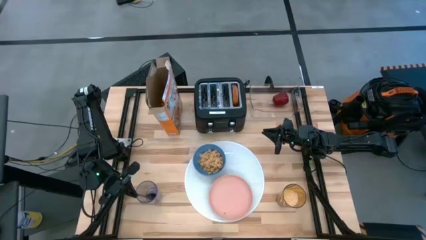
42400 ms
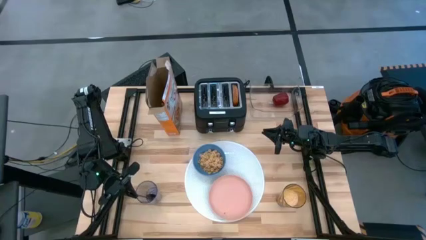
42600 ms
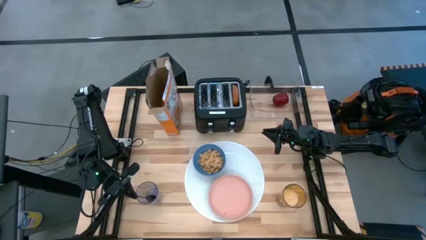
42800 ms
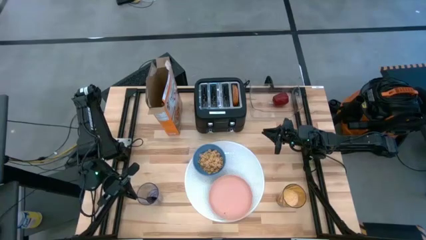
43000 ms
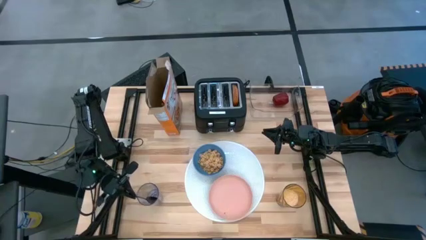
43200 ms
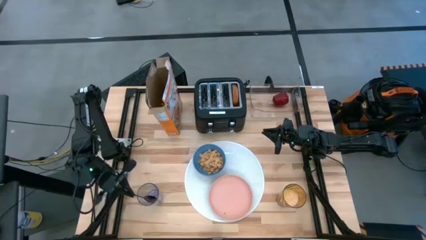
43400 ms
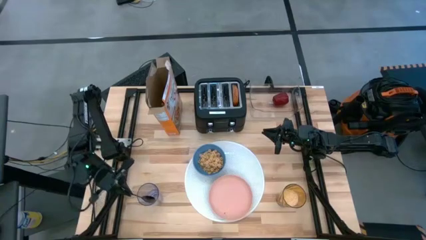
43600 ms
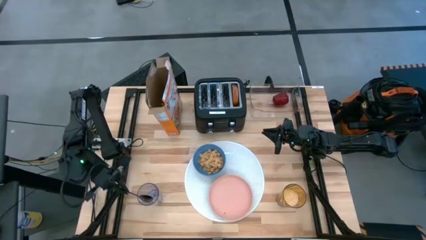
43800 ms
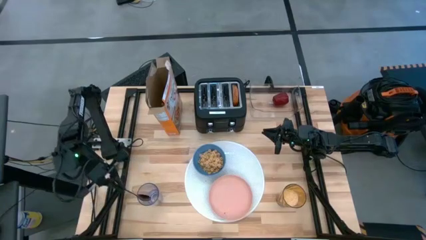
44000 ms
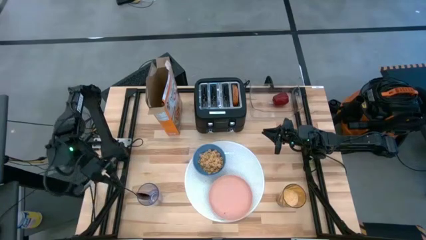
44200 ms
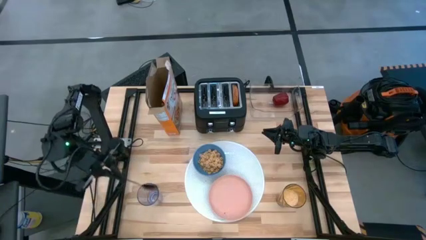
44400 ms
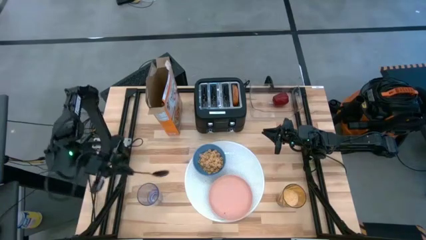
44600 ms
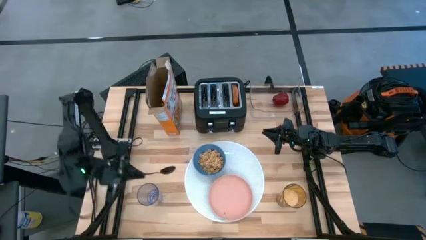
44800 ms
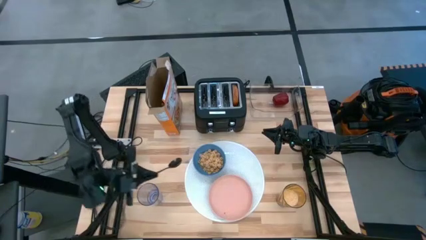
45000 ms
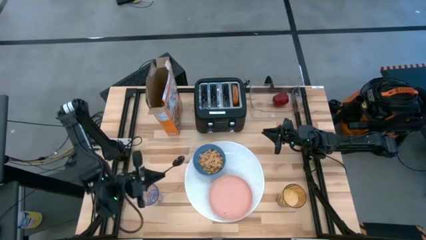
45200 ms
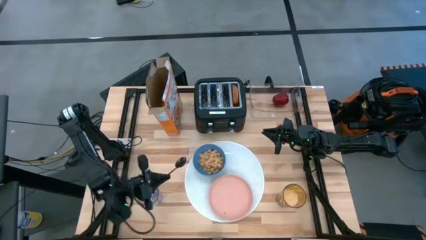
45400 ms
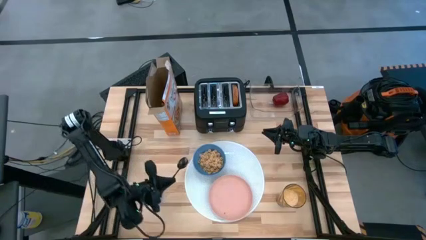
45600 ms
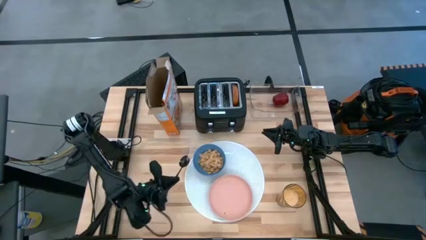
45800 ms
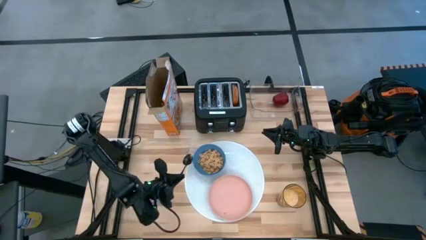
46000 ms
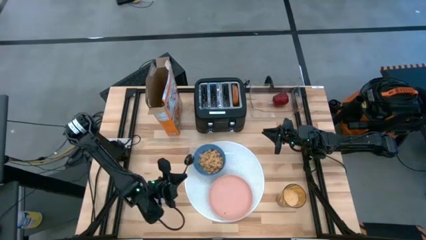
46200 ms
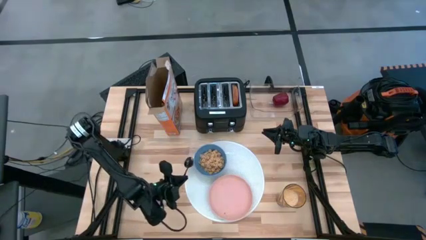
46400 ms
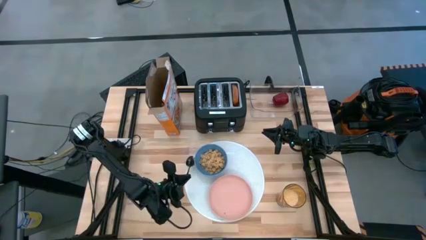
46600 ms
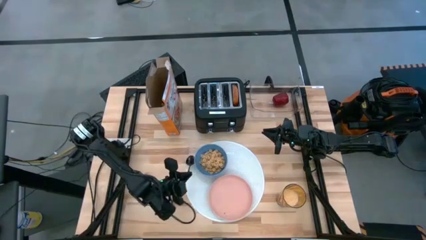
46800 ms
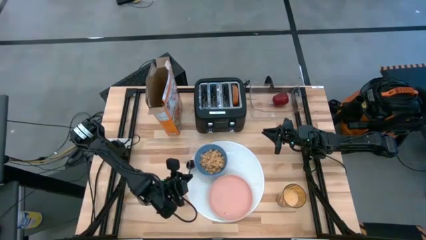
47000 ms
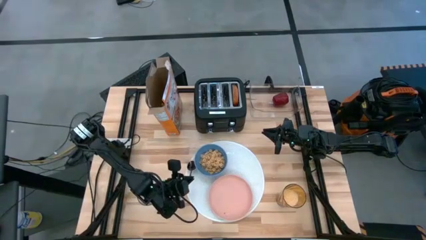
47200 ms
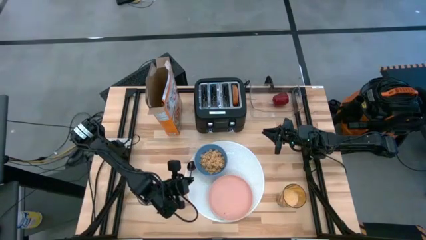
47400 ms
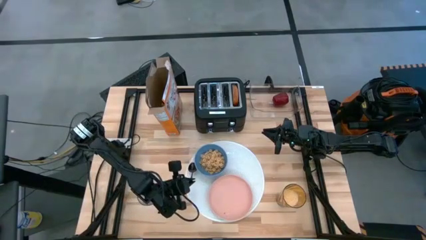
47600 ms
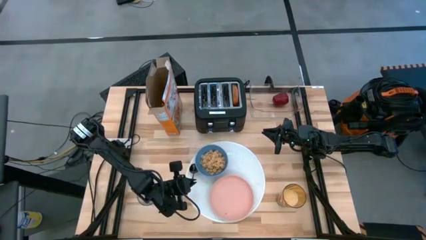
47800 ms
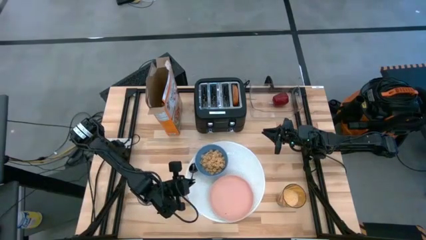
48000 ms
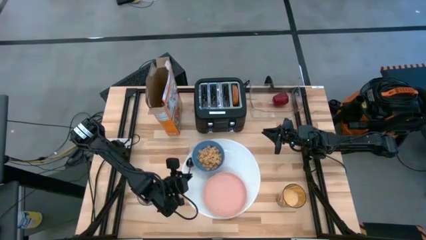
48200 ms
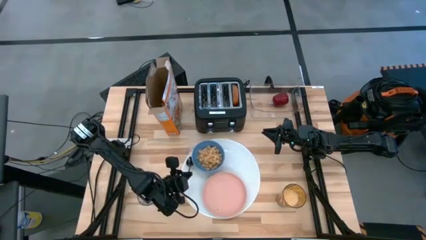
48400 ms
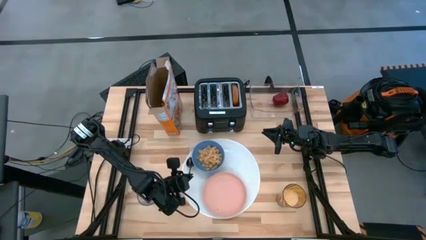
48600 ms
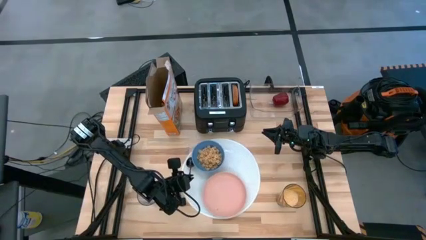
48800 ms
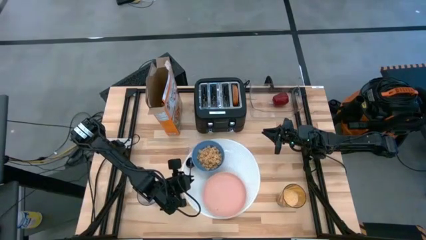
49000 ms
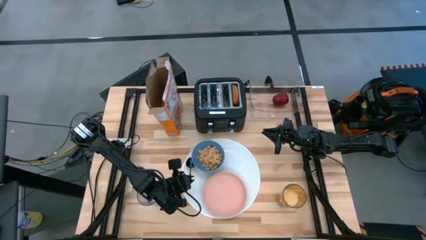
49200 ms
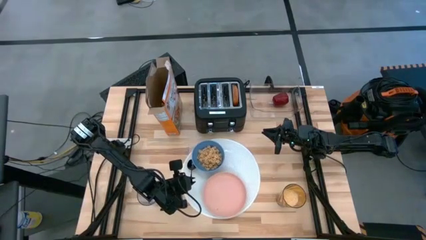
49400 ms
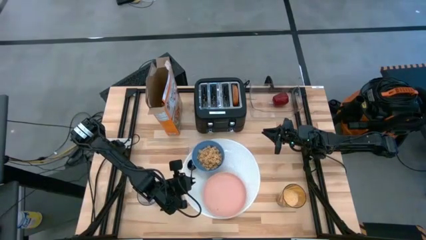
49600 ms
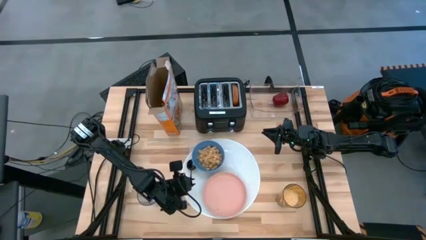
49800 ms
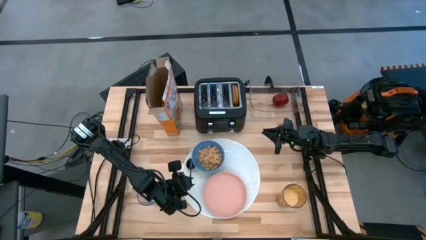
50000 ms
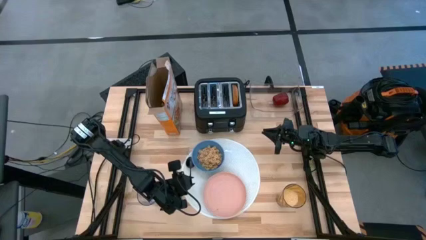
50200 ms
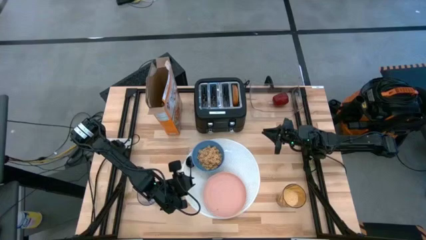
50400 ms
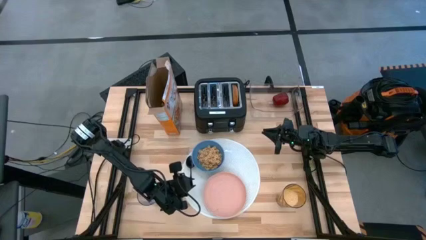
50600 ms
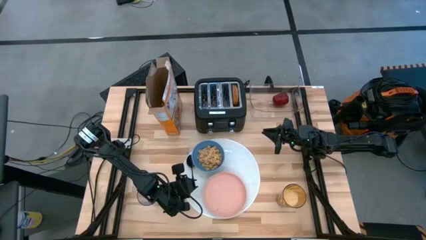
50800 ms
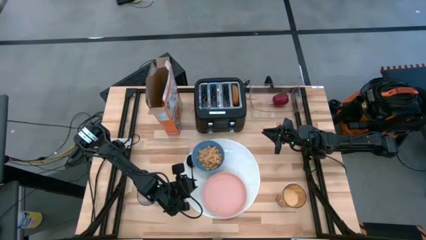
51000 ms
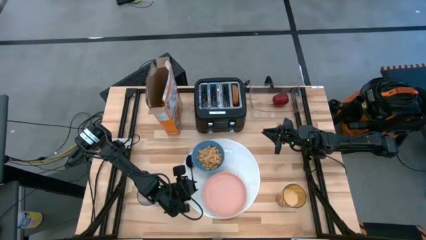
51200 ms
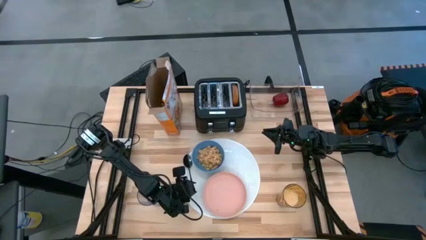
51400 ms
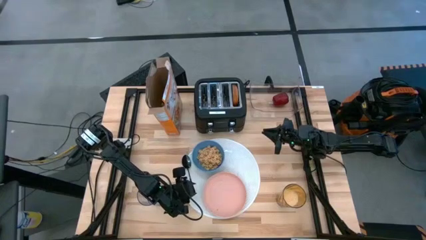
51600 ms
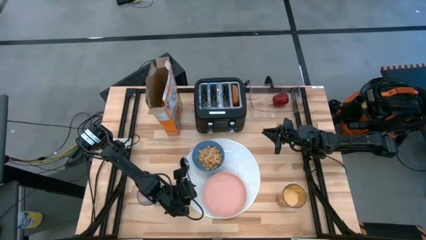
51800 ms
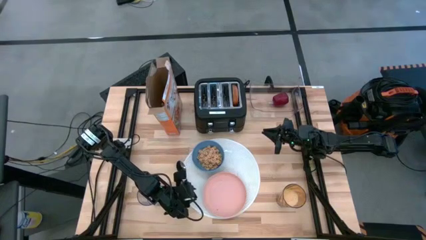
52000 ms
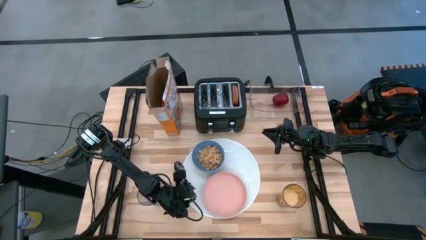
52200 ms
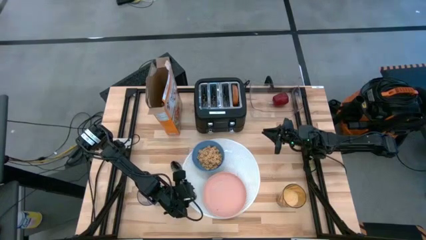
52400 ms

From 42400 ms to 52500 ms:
Task: Arrange a breakfast setting
Put the black spoon on the table mat

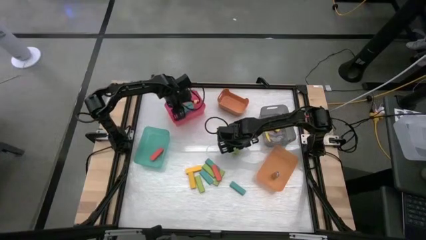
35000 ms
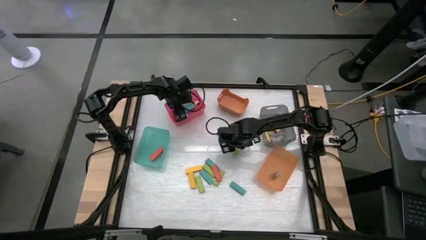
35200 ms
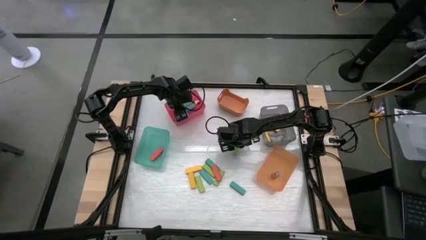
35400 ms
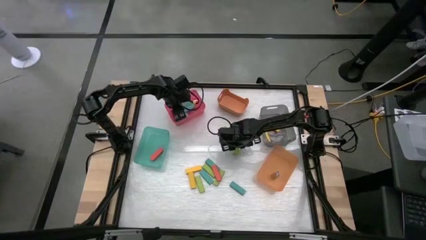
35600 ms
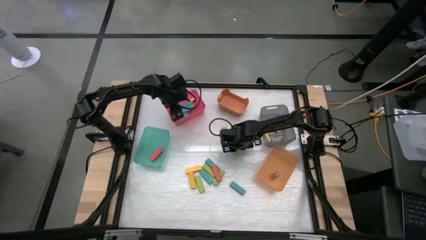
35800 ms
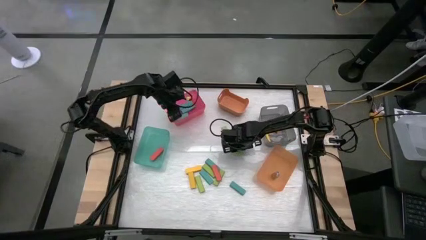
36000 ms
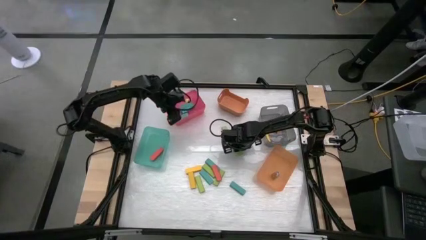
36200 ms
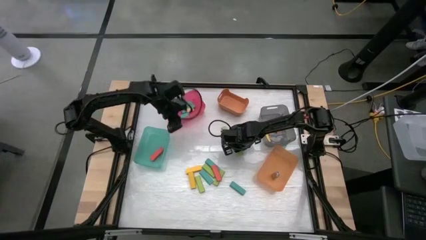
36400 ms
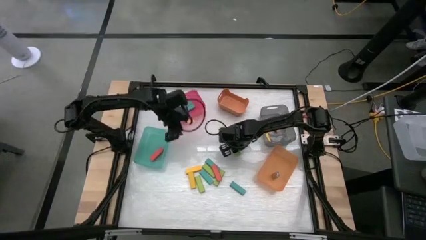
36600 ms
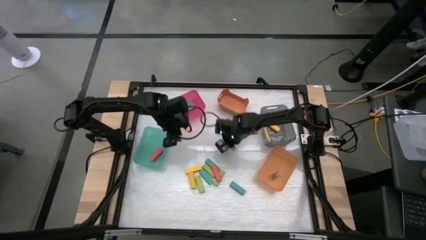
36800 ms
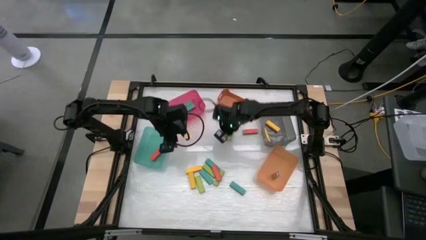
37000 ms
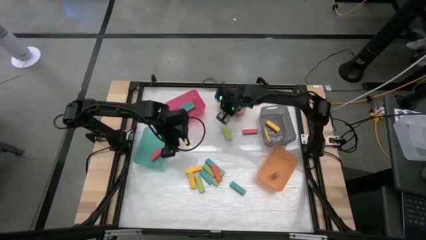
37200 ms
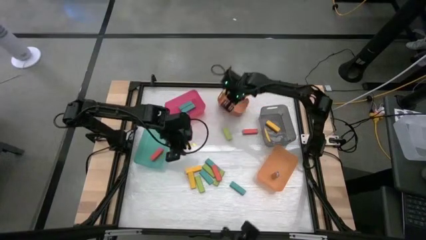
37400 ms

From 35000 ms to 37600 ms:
Task: Sort blocks
Put the green block into the orange bin

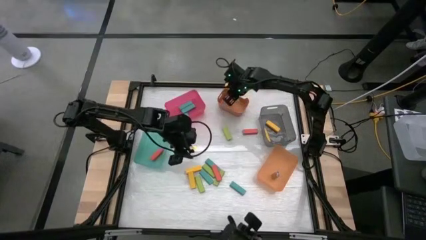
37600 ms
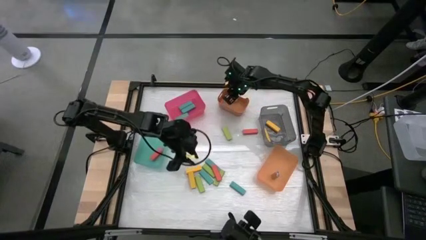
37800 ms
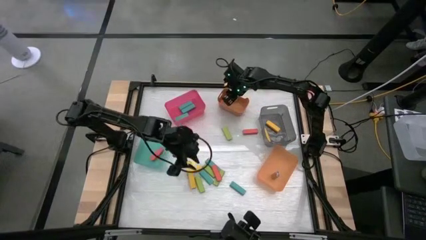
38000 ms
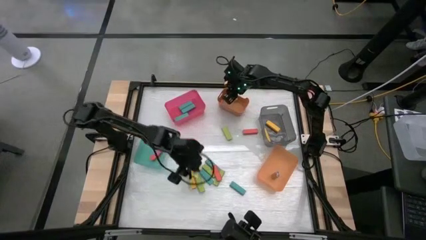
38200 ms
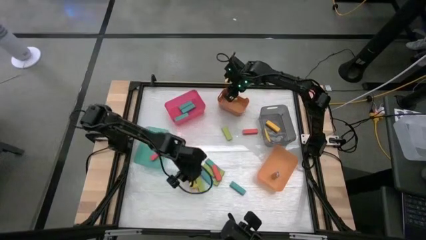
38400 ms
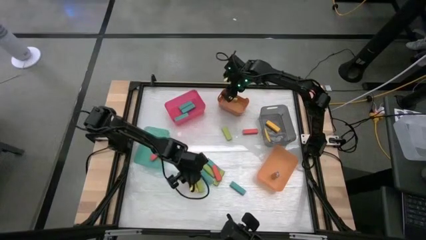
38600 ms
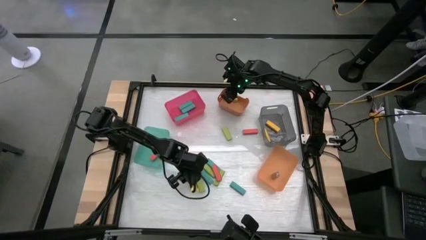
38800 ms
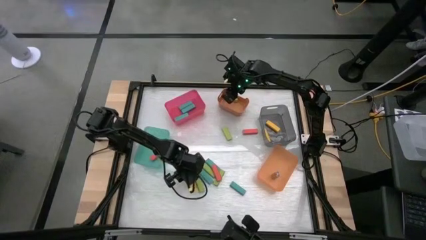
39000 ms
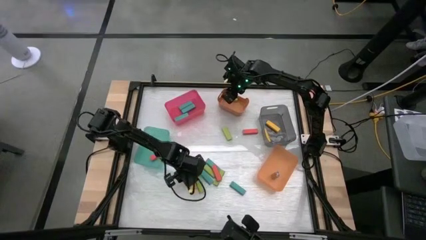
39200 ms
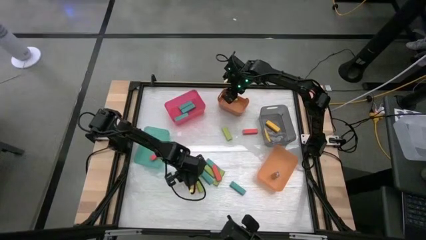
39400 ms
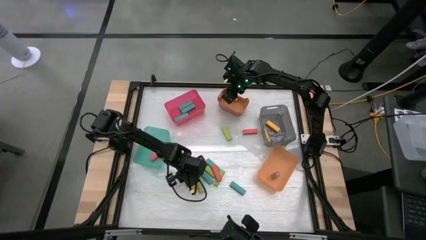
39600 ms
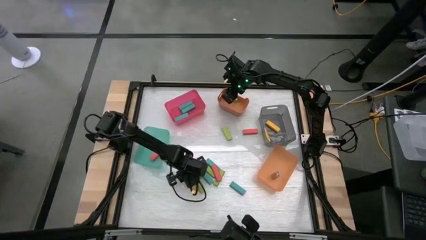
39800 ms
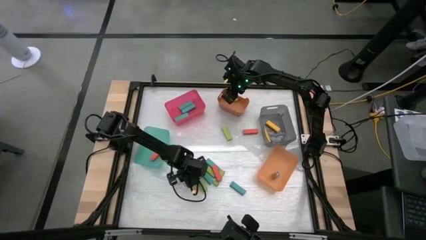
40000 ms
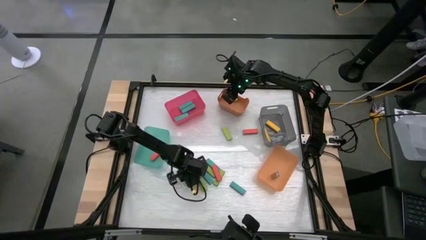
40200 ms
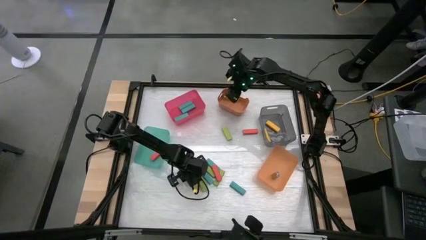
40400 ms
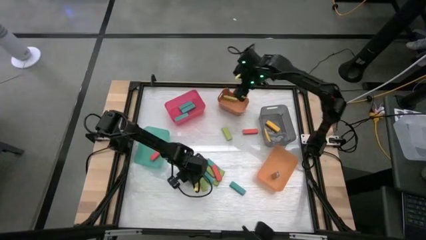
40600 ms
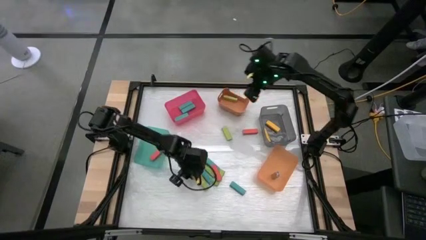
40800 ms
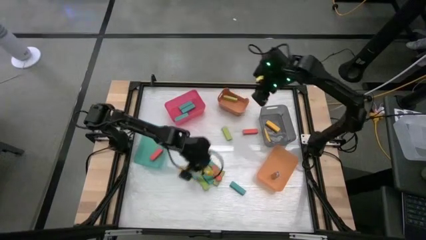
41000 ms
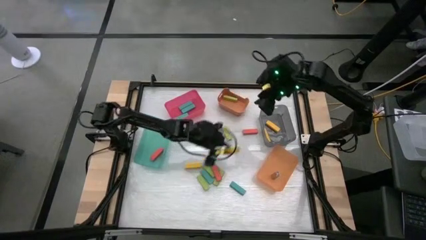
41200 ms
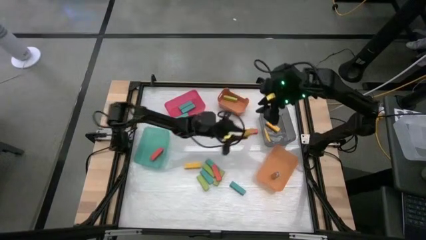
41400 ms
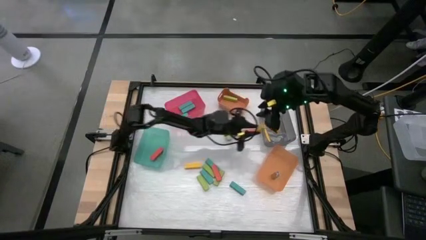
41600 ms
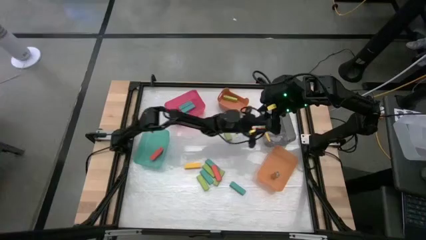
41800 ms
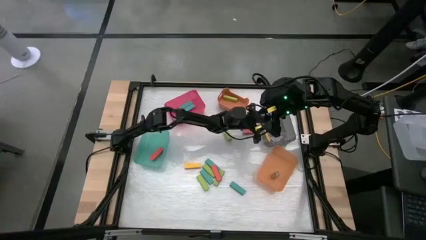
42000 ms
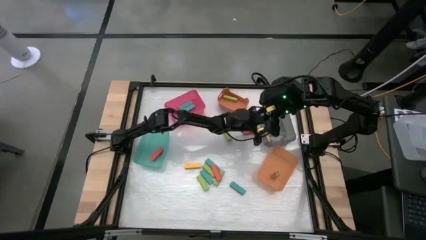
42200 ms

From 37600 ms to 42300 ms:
Put the yellow block into the gray bin
